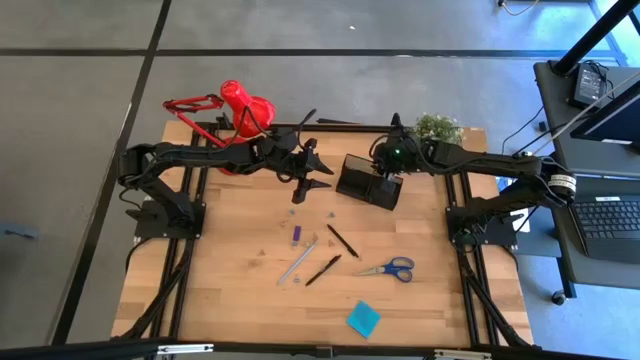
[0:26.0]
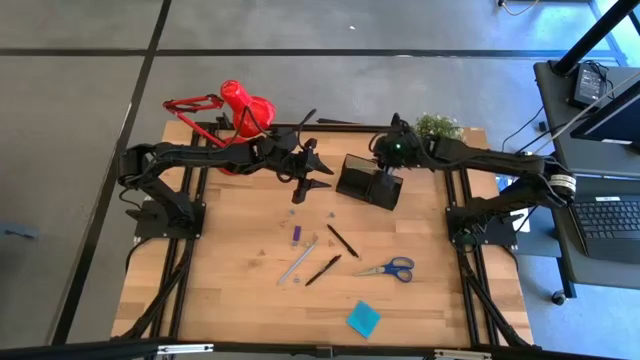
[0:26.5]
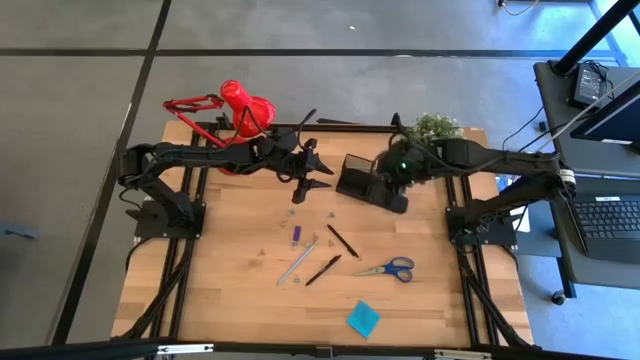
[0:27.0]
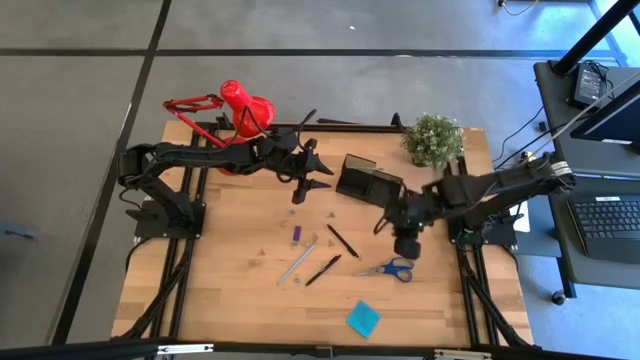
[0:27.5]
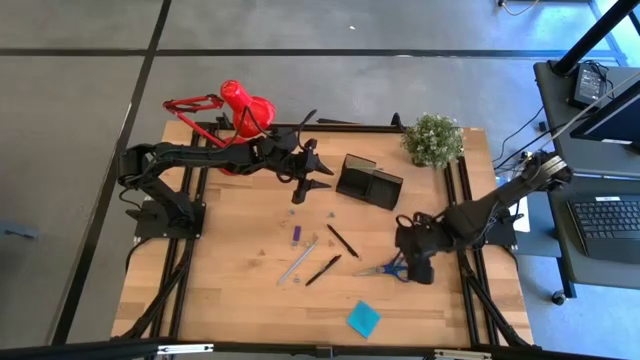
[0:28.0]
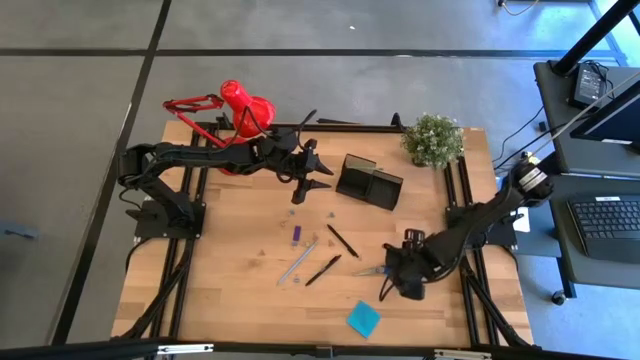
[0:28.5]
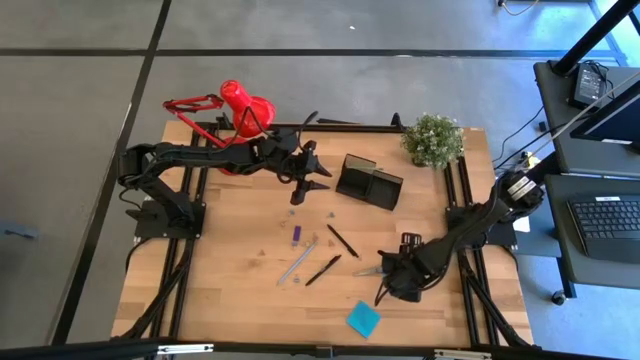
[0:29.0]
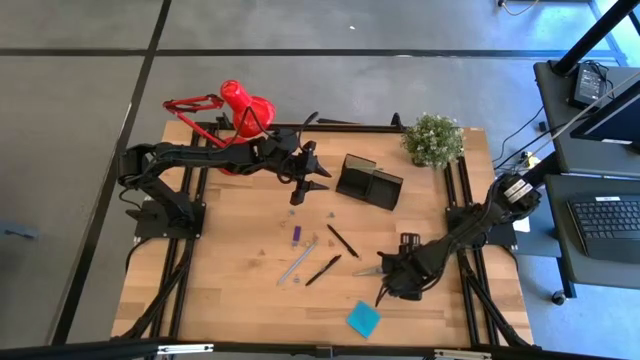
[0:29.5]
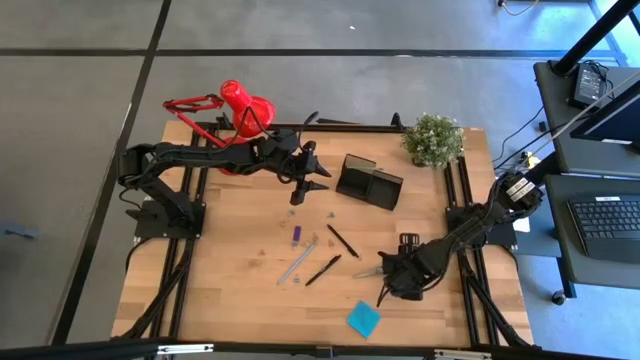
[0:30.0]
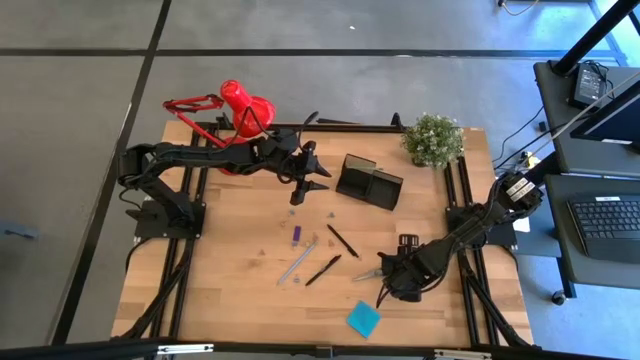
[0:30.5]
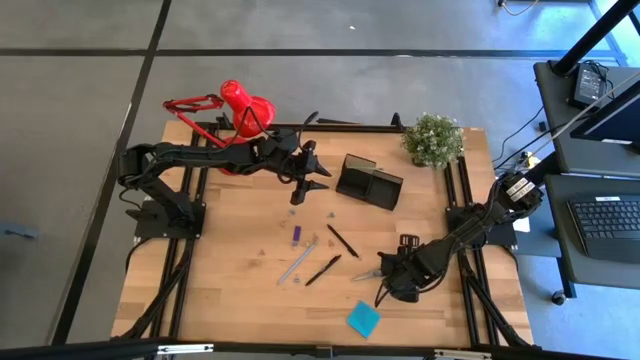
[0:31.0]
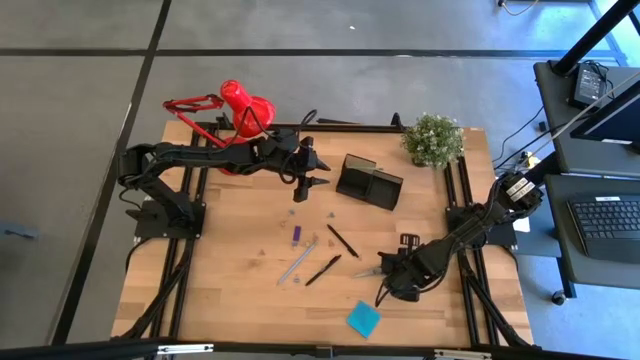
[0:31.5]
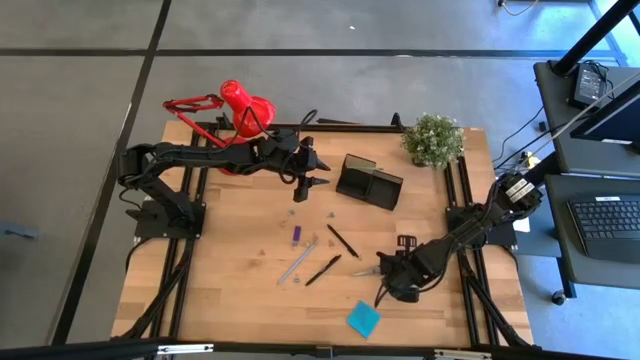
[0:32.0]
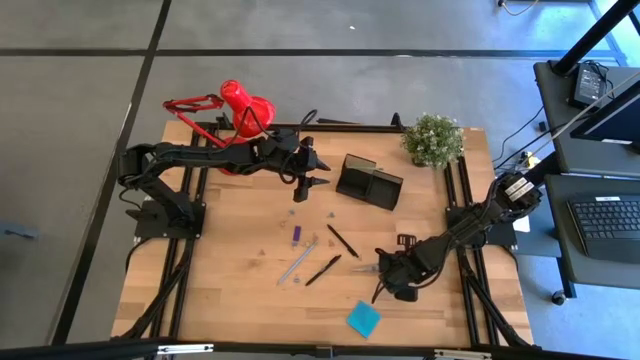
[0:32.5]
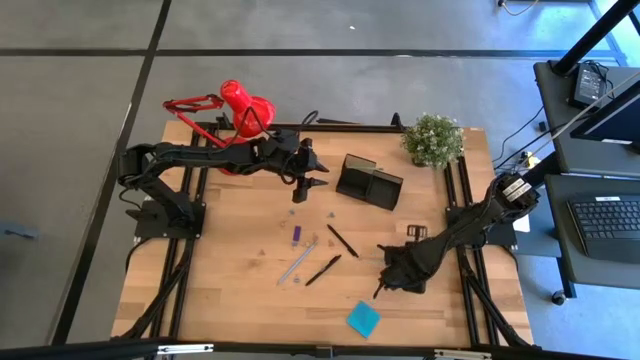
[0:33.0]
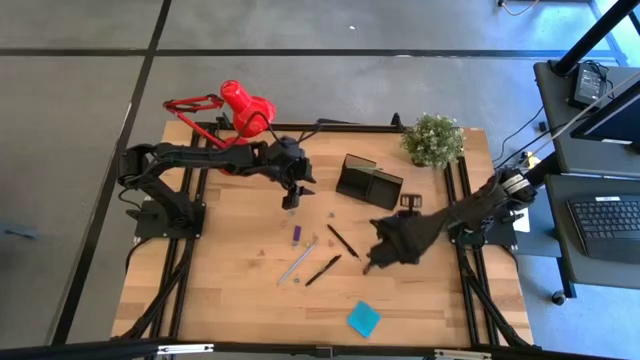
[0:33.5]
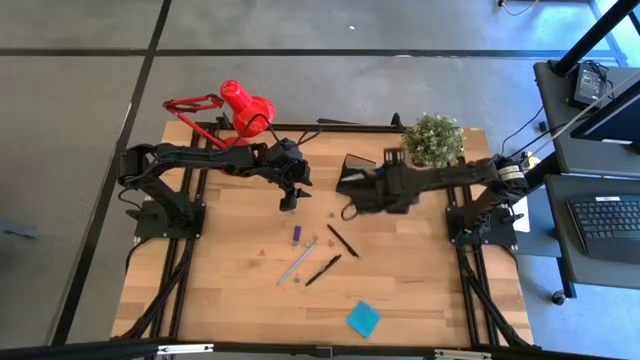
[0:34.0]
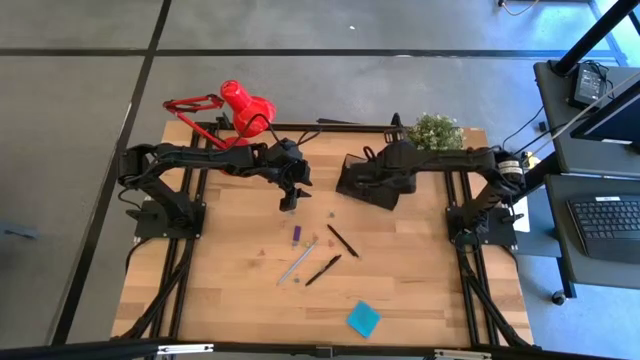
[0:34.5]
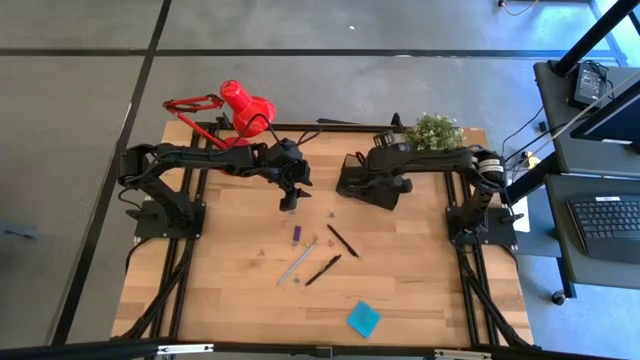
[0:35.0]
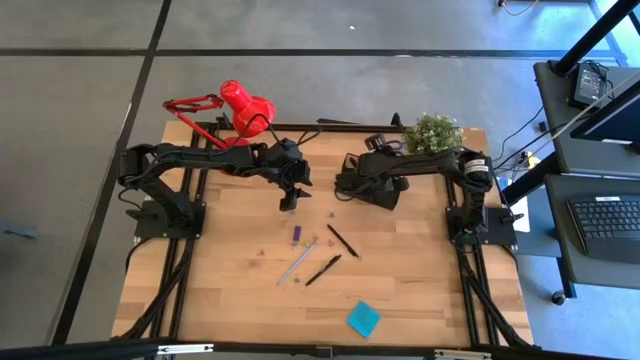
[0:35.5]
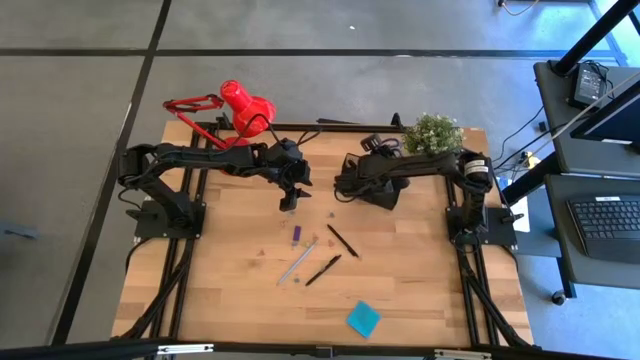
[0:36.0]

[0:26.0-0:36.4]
Task: Pick and place office supplies into organizer
Put the blue scissor into the black desk organizer

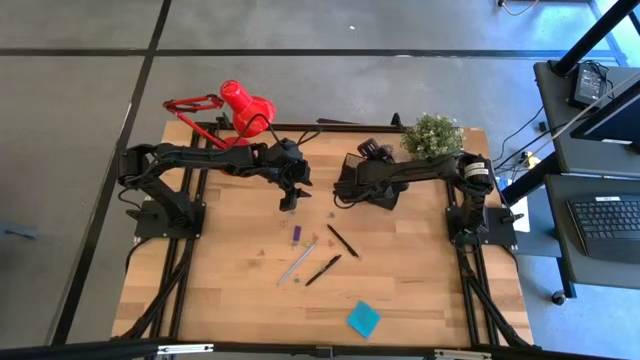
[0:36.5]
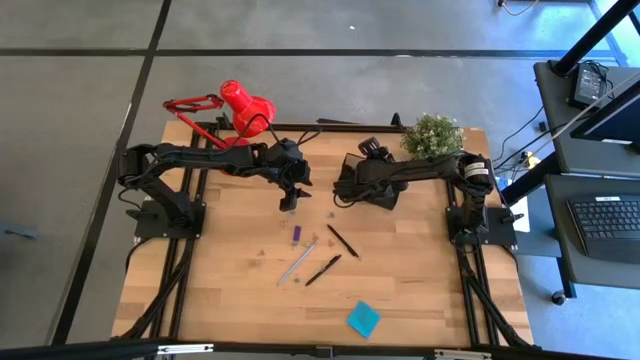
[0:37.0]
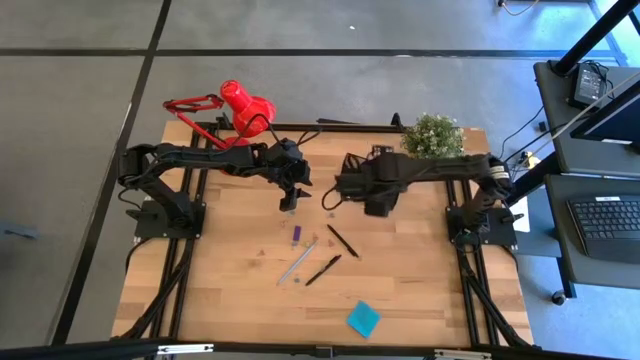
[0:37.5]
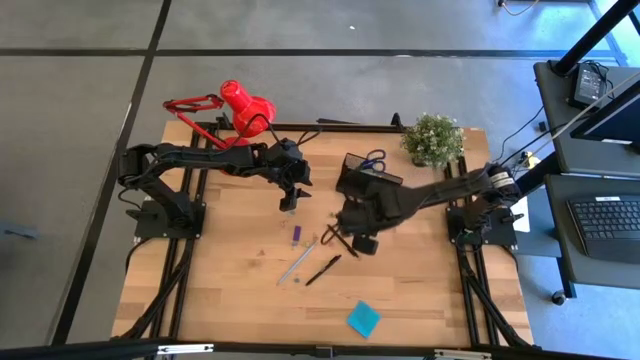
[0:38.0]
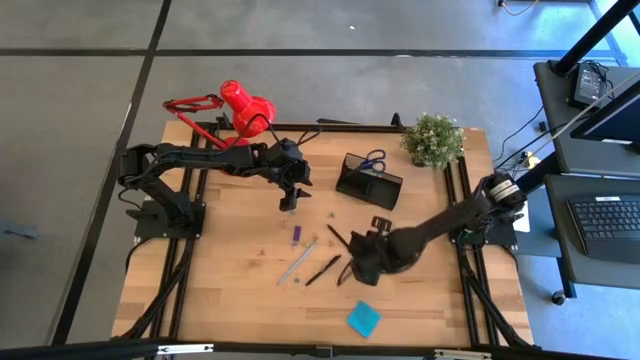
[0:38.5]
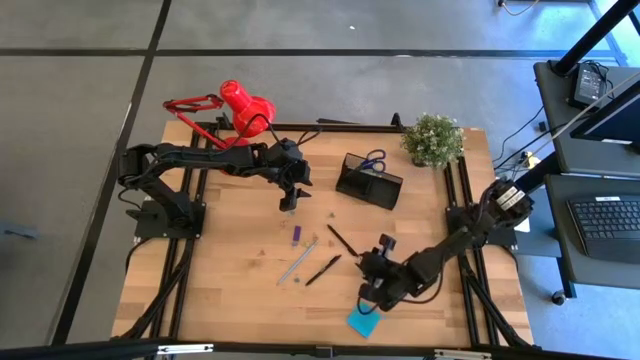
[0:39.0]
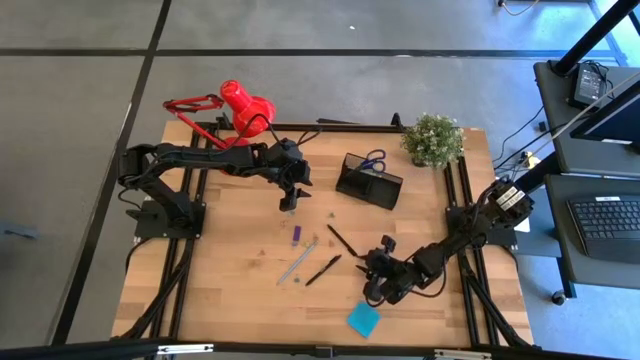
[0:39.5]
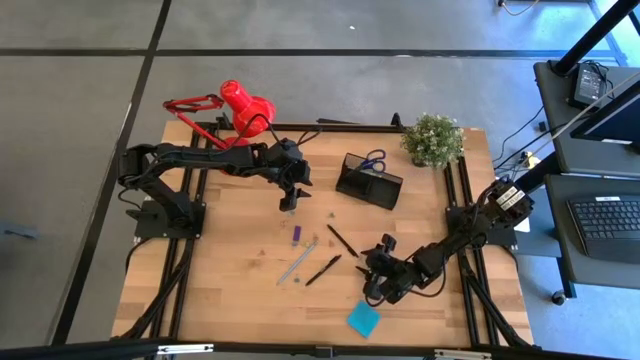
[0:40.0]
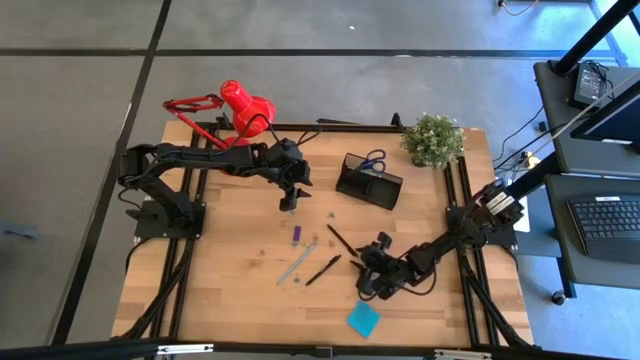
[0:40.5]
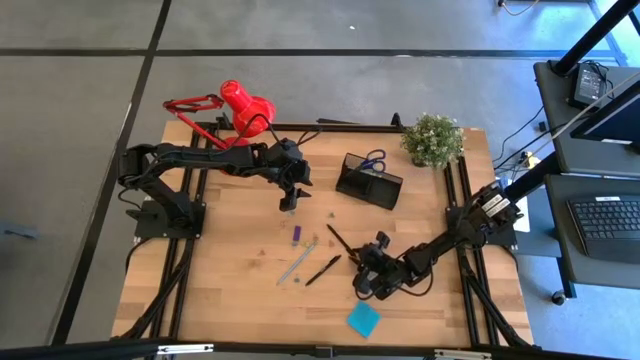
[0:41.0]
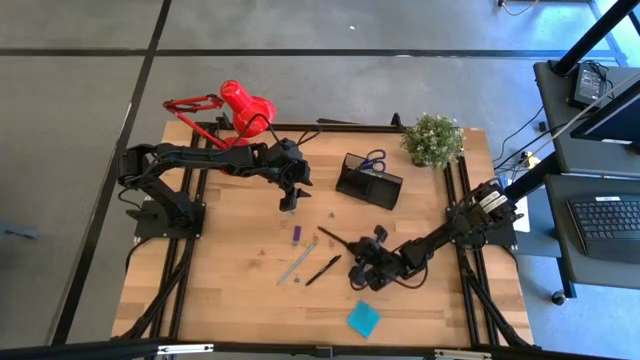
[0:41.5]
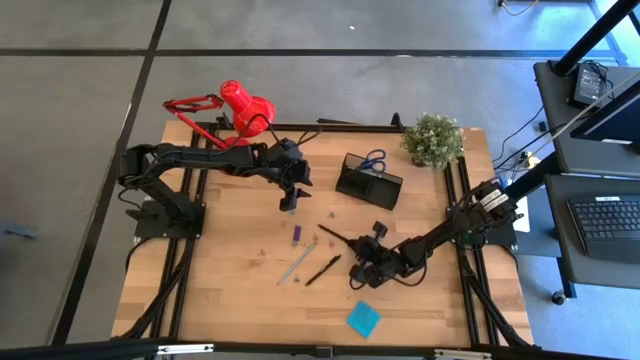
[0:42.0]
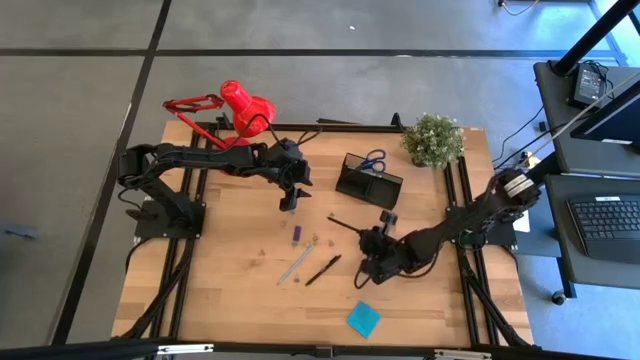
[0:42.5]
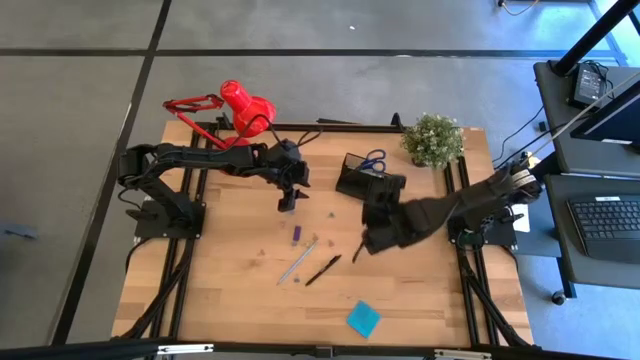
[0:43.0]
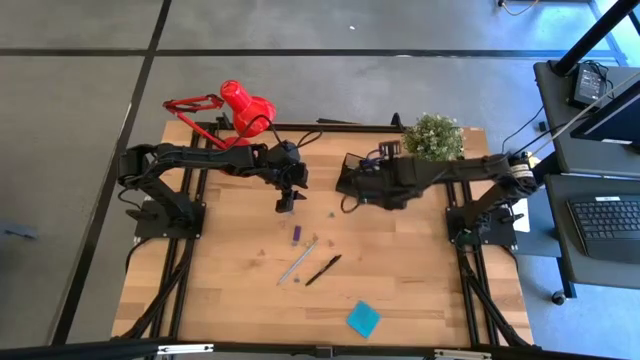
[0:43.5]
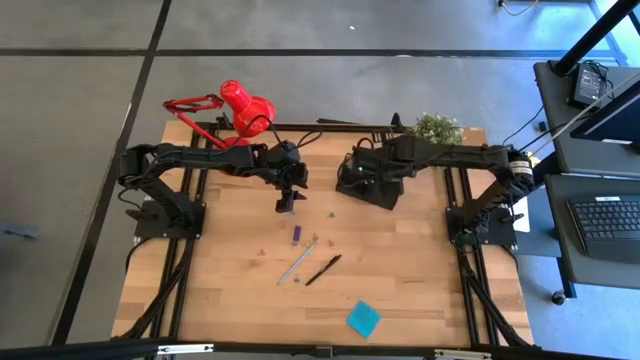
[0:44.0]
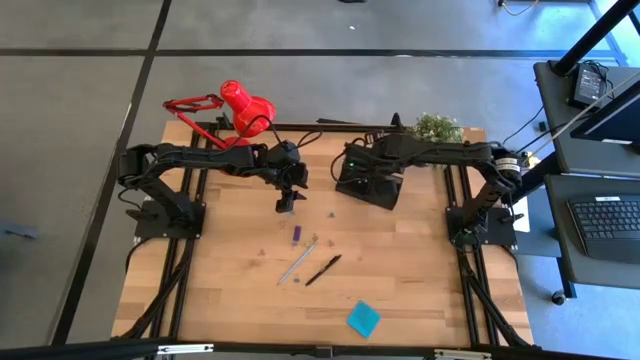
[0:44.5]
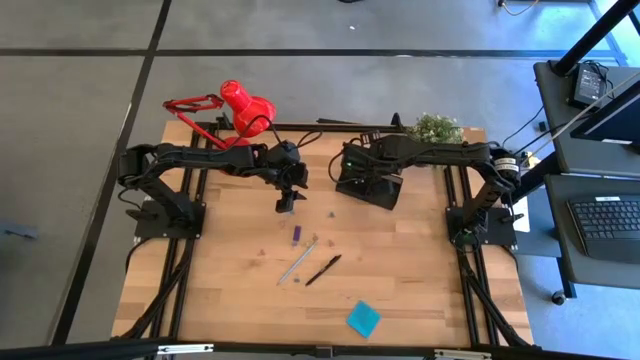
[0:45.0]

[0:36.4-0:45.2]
Put the top black pen into the black desk organizer

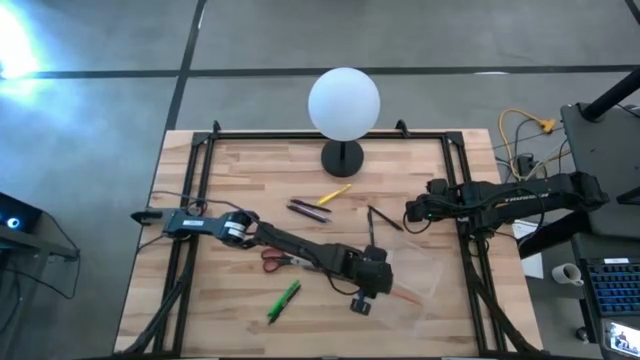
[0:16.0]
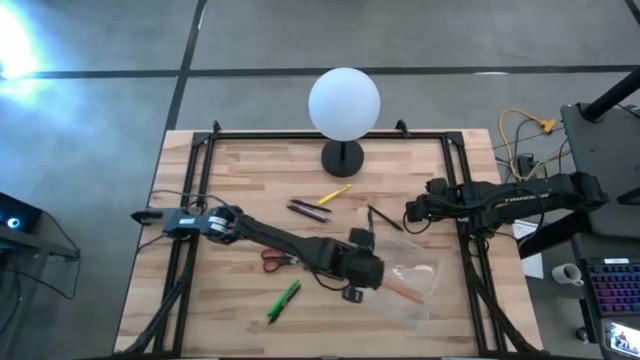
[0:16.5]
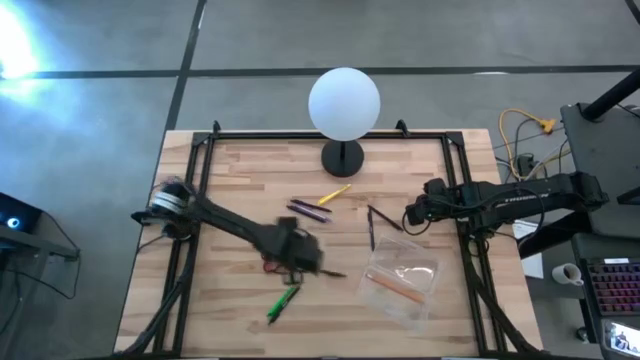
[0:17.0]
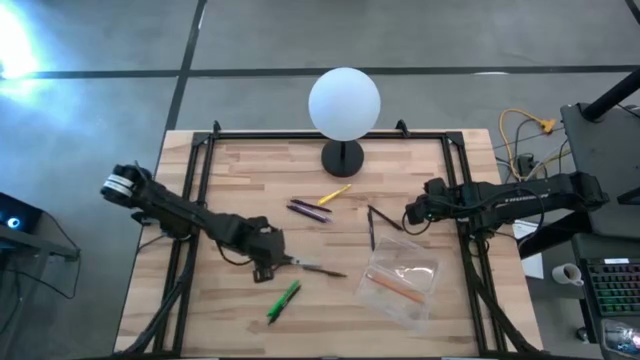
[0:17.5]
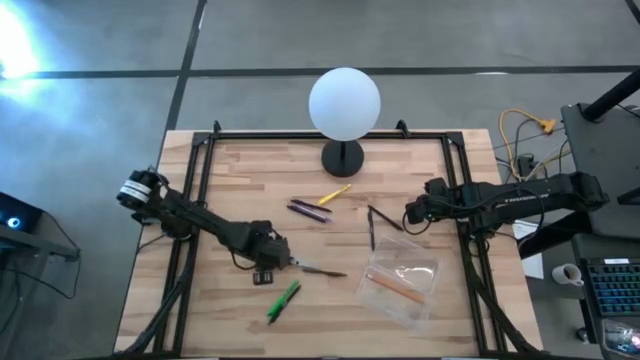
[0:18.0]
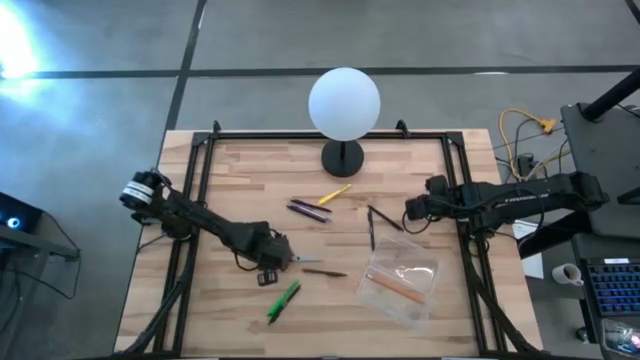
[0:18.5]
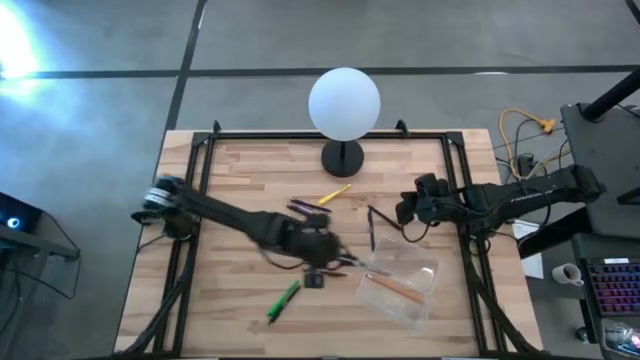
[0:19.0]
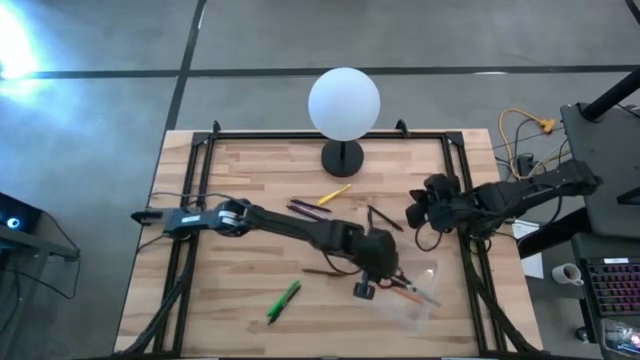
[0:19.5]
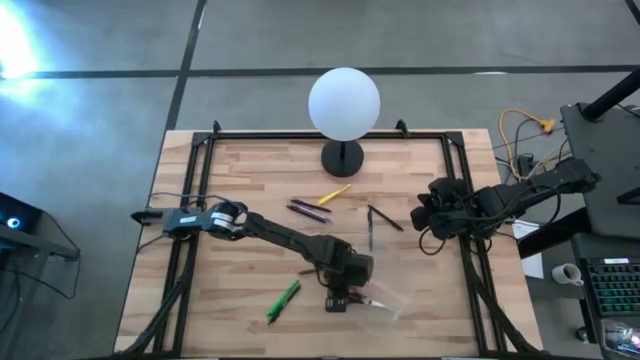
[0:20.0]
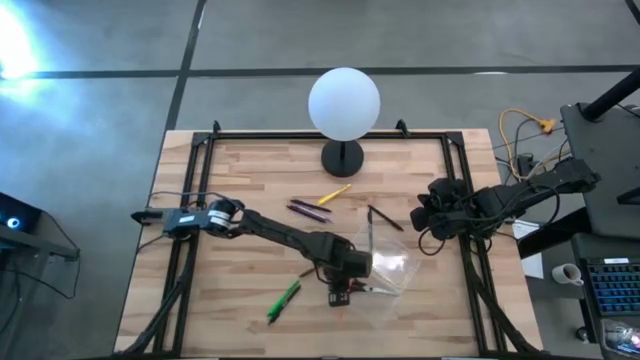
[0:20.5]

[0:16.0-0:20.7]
Task: Pick & place school supplies into a supply box
Put the black scissors into the supply box
